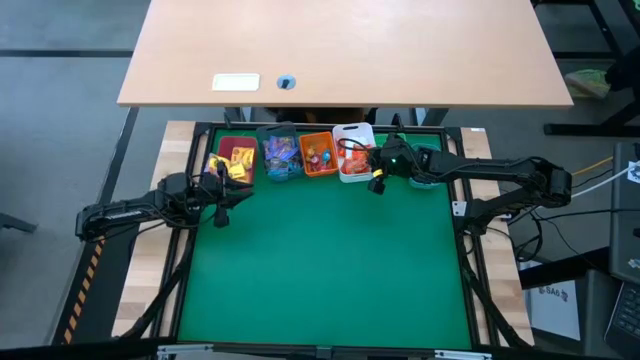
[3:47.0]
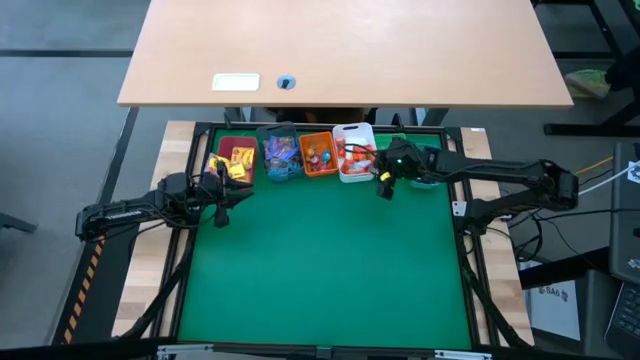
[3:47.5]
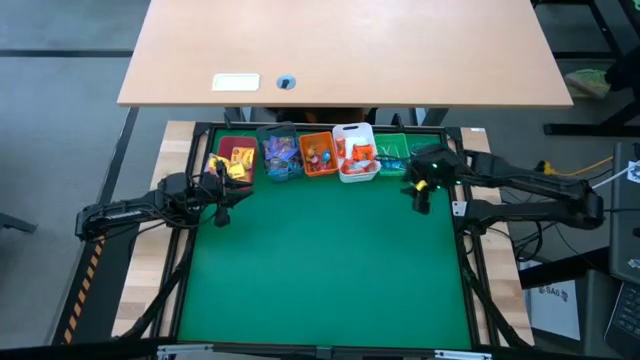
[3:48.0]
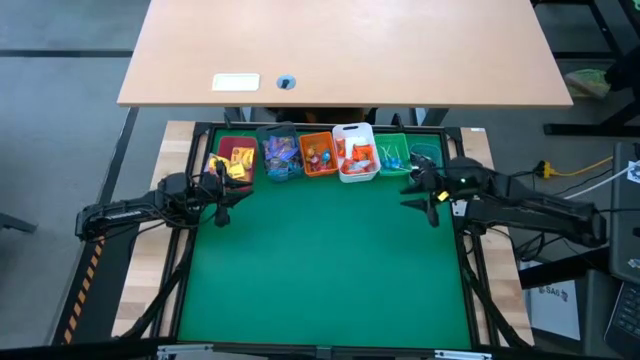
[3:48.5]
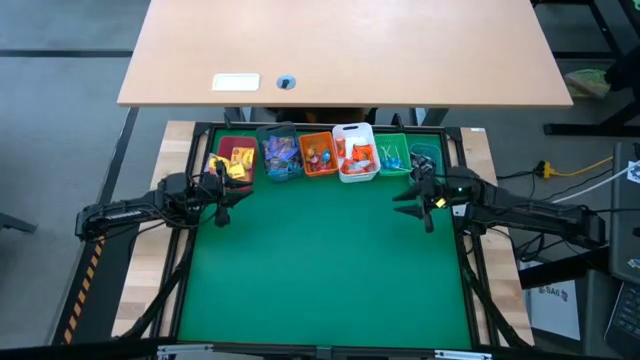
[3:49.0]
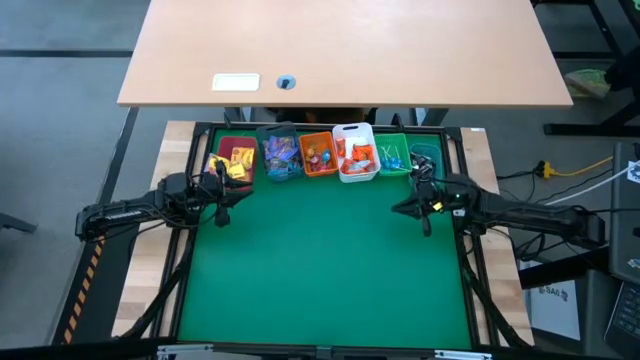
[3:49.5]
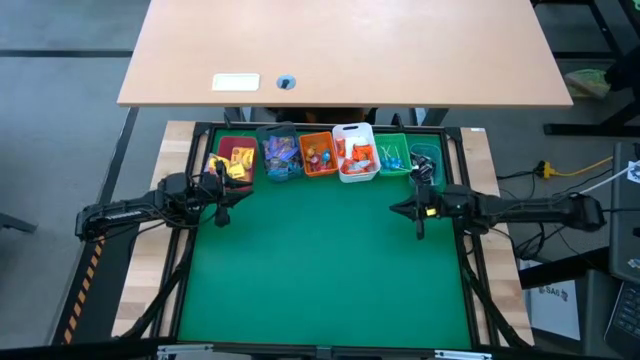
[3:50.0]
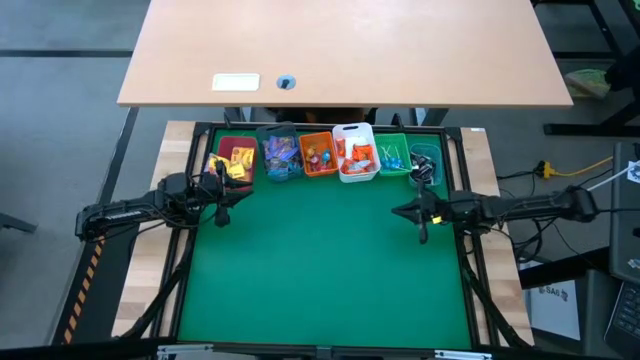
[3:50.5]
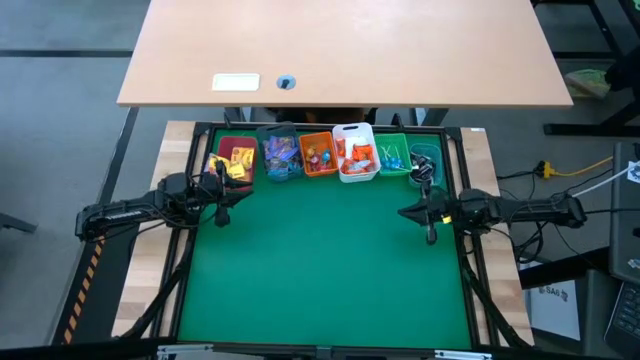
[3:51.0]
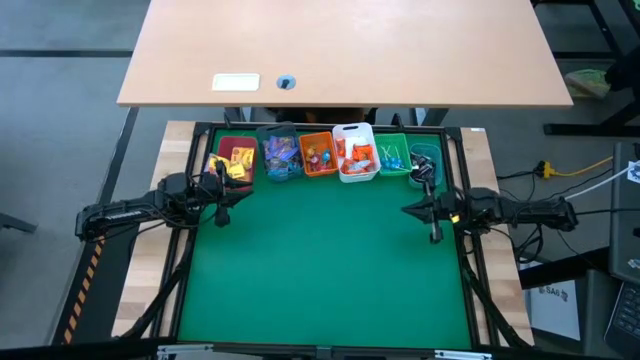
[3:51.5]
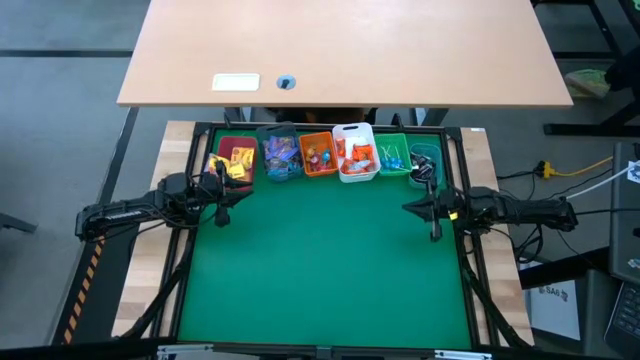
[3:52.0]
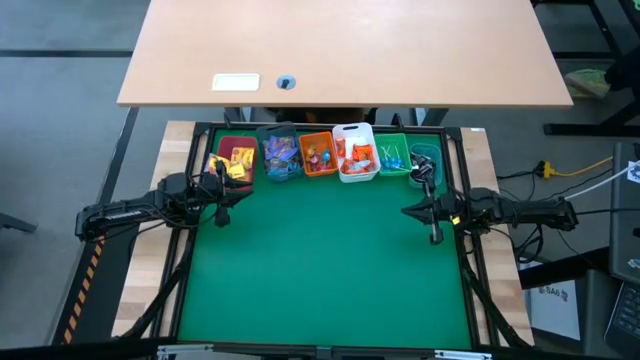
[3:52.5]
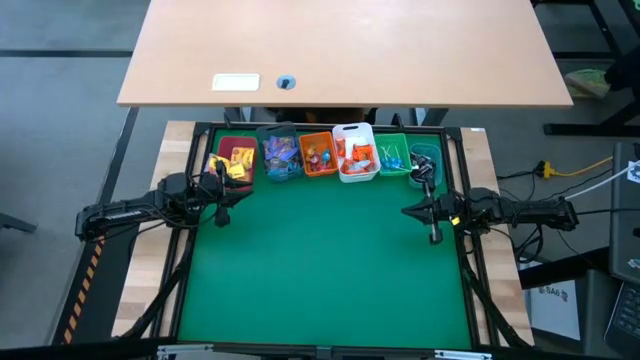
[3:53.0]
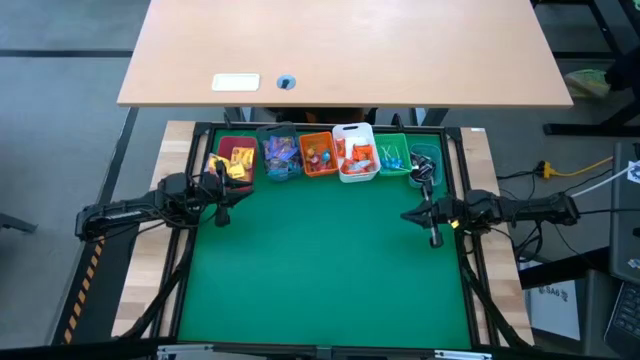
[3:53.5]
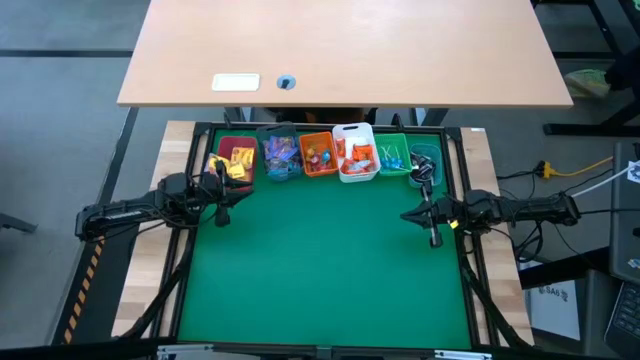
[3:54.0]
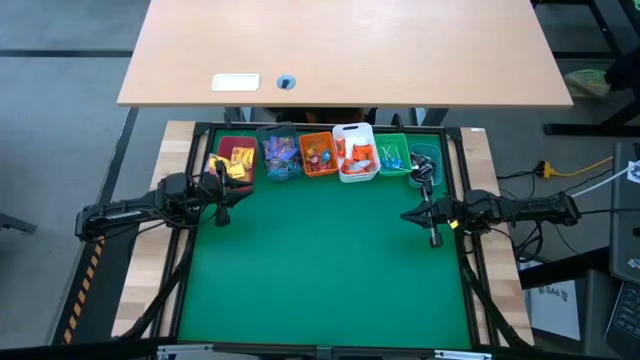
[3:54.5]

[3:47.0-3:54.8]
Task: Sort candy
Return to Home Position

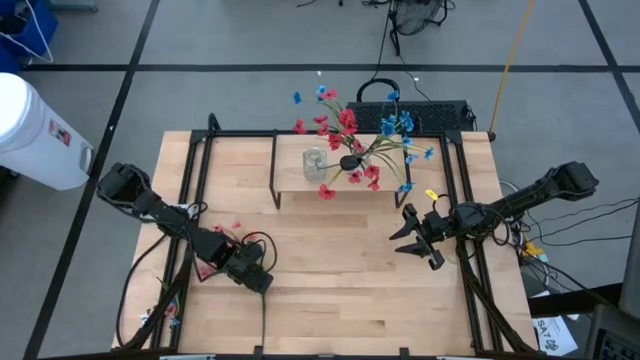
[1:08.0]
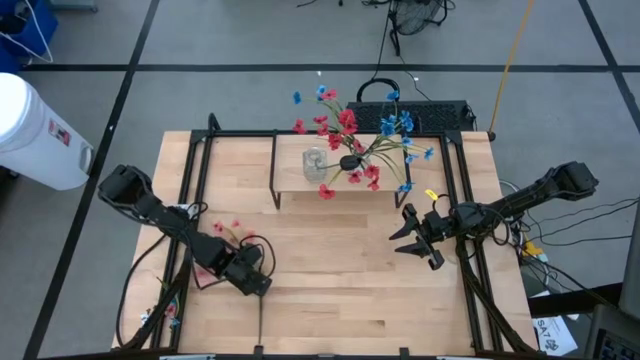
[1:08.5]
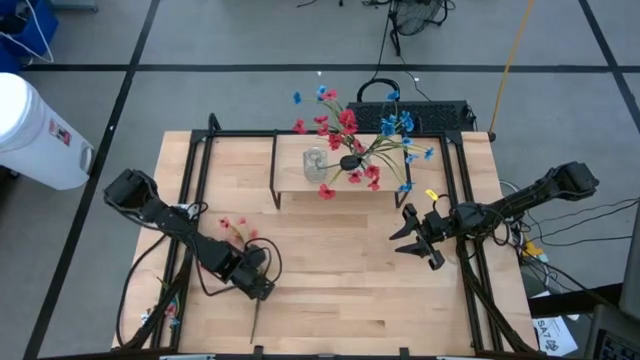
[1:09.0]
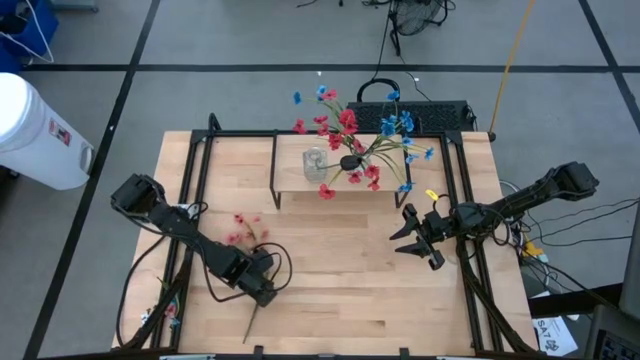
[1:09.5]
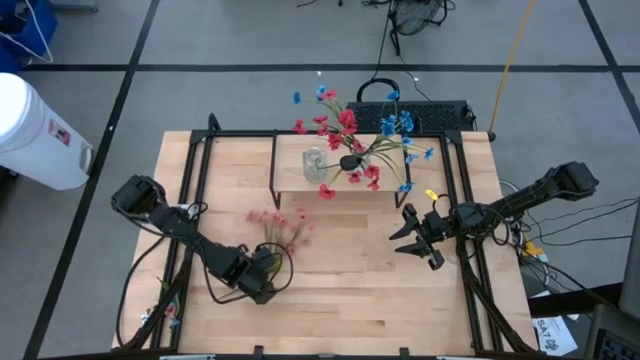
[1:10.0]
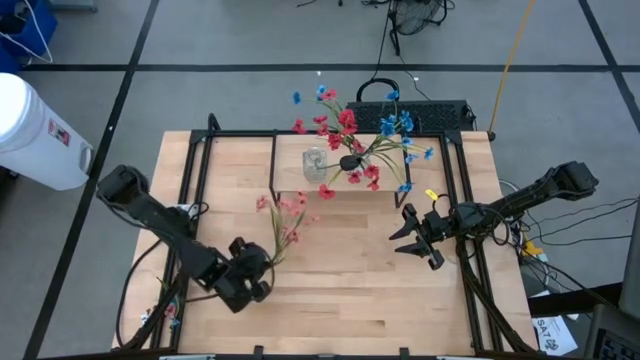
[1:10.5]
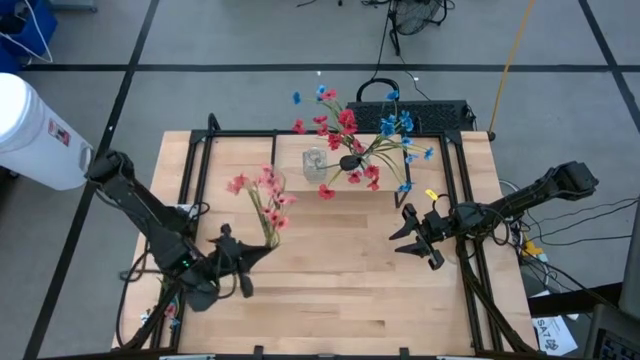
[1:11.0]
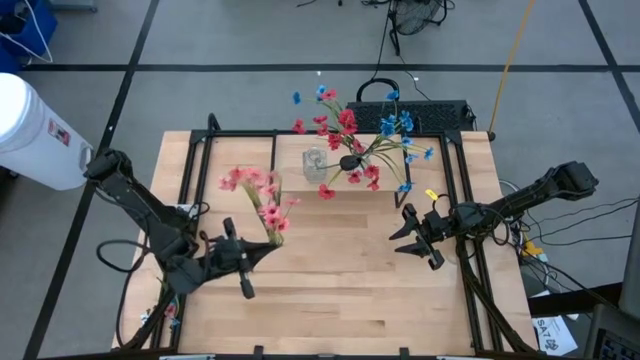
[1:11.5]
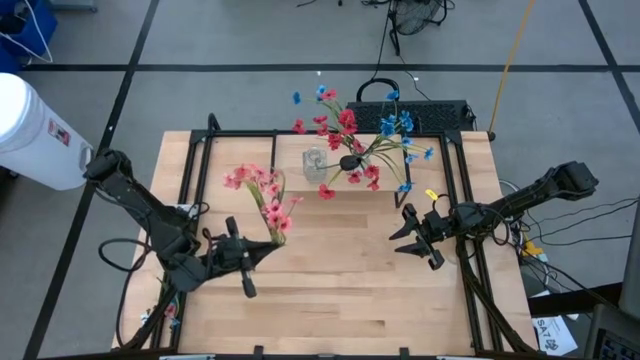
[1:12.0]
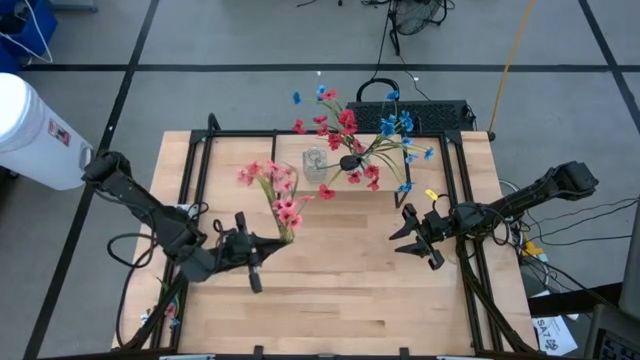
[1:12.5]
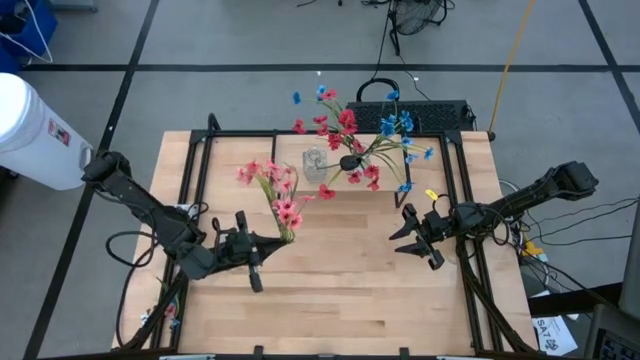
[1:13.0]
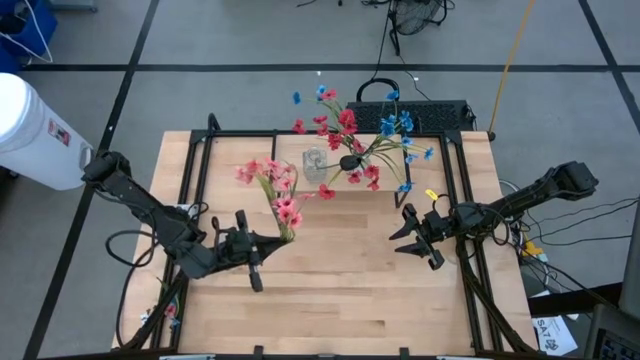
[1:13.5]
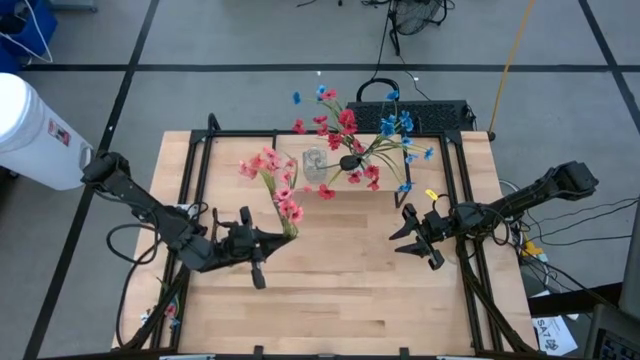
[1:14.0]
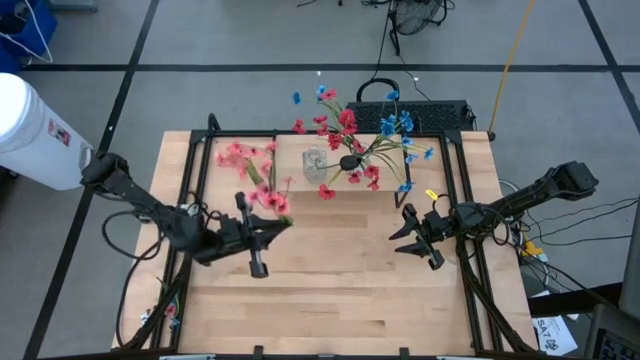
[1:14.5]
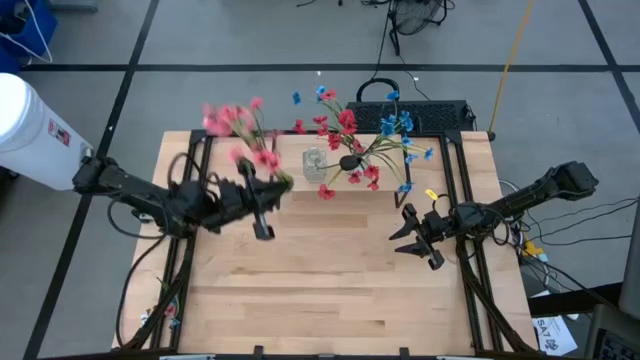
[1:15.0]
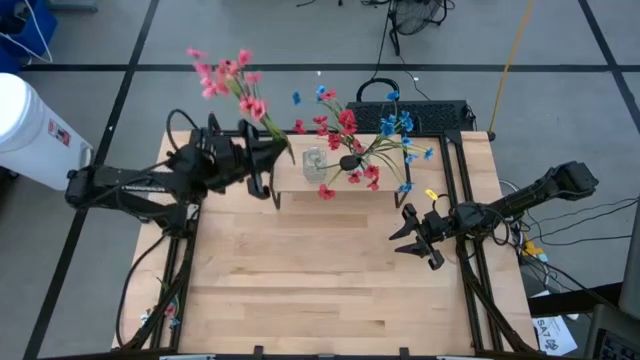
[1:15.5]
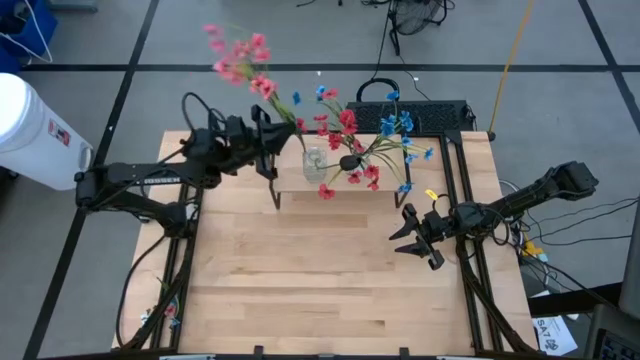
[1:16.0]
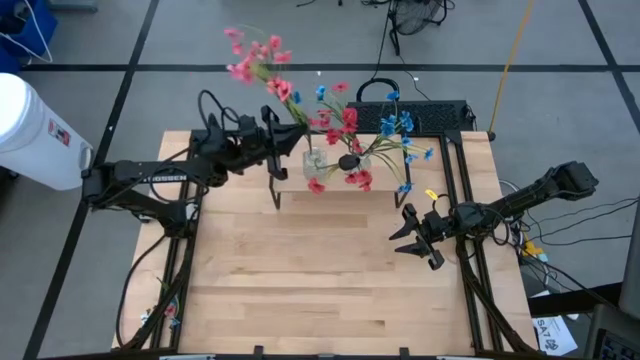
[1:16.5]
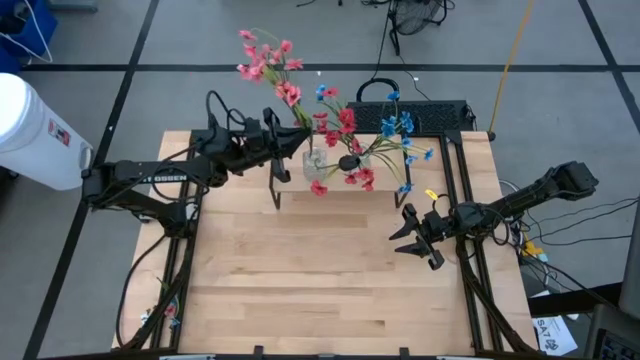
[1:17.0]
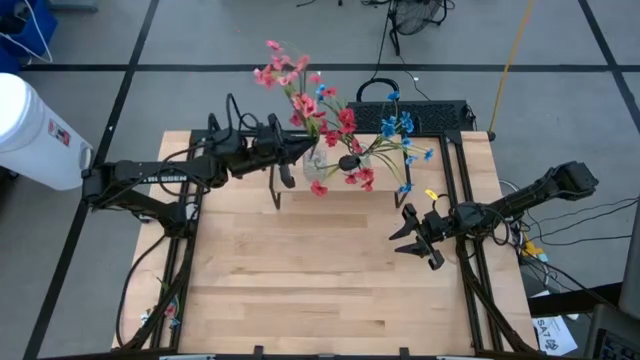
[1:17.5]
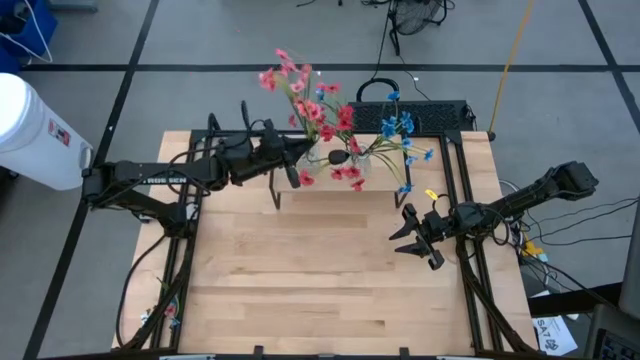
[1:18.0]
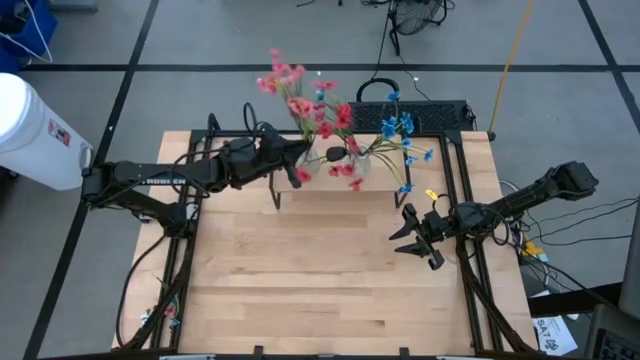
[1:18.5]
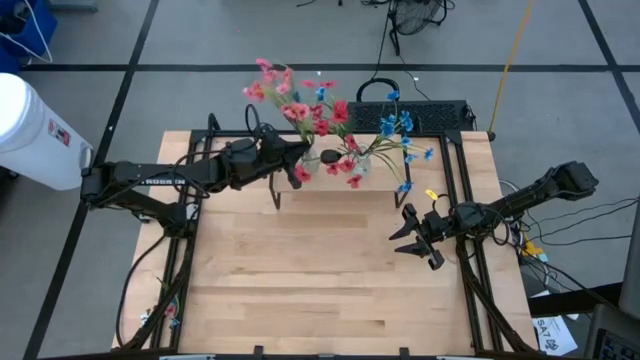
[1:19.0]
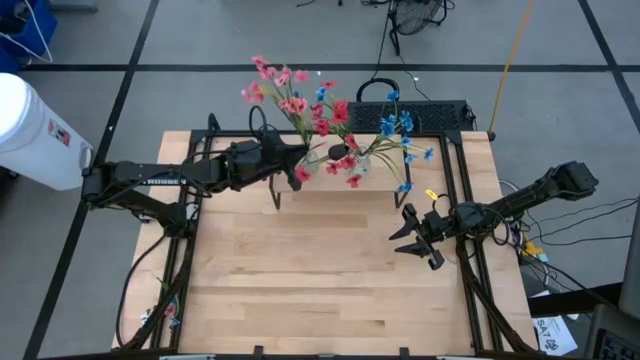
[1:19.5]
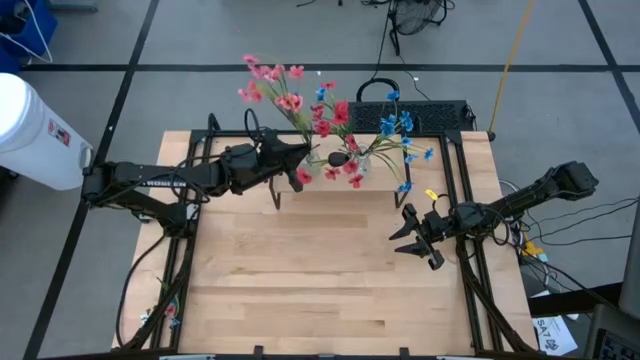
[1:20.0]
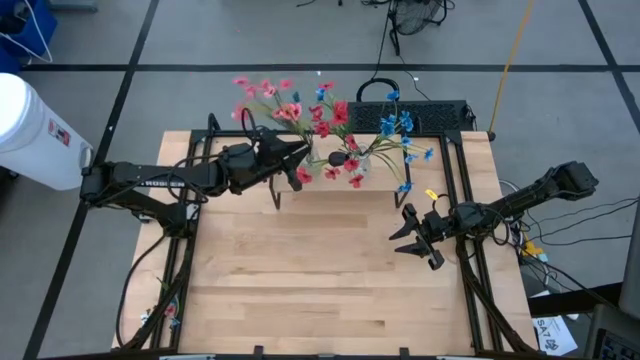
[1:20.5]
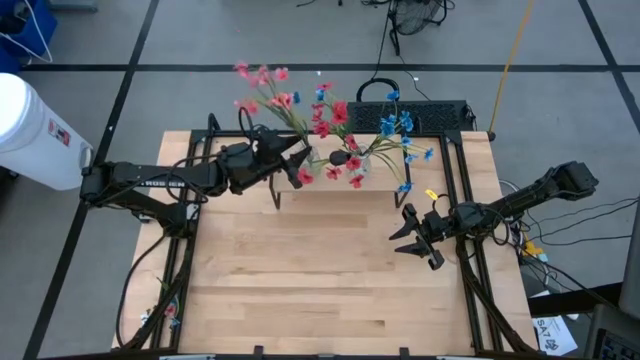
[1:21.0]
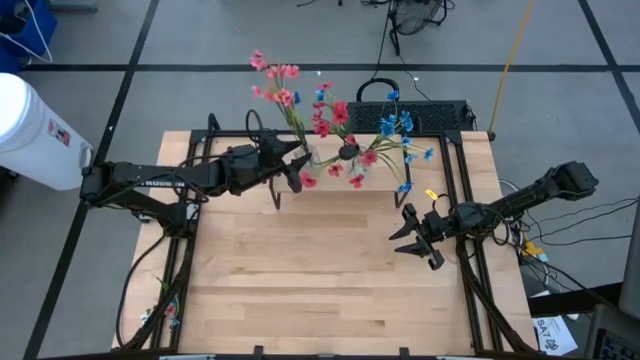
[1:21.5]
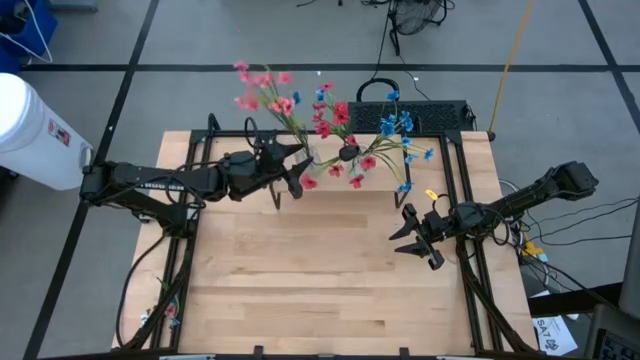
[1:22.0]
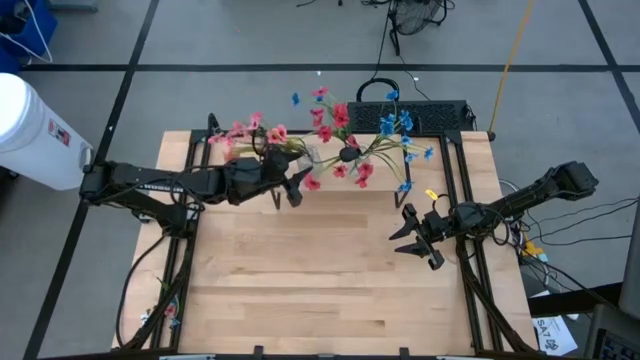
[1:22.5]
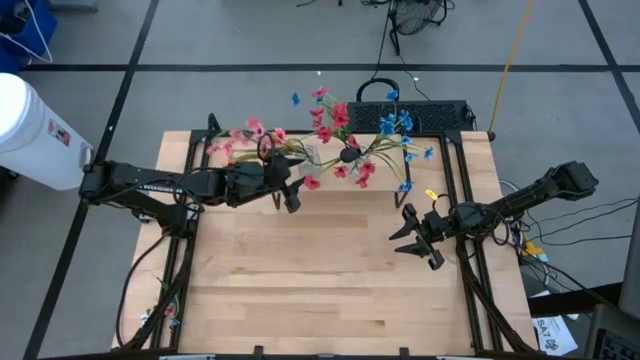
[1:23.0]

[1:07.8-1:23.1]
Task: Pick and place flowers into a vace then onto a shelf
Put the pink flowers into the left transparent vase on the shelf
